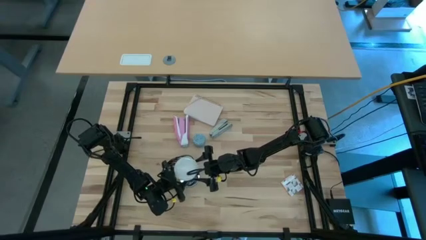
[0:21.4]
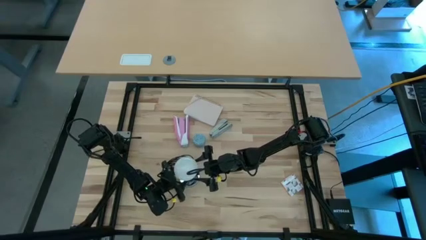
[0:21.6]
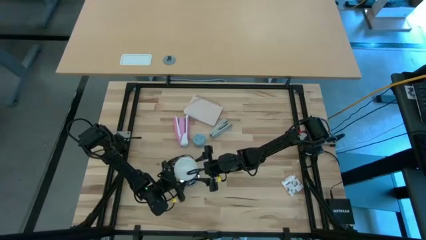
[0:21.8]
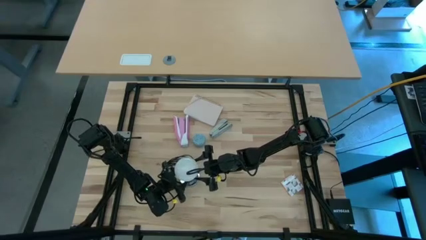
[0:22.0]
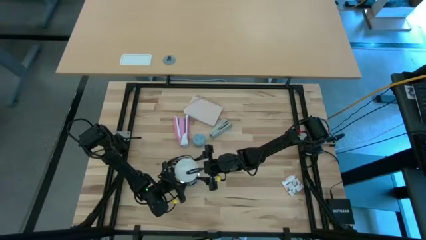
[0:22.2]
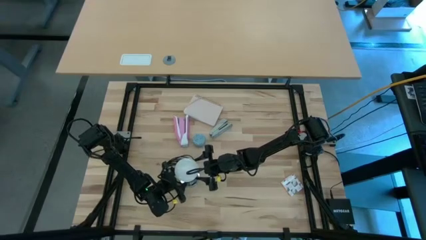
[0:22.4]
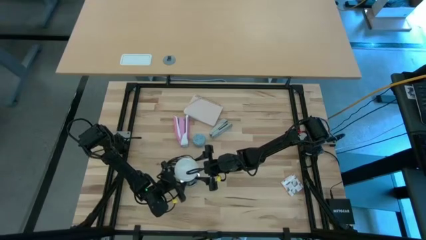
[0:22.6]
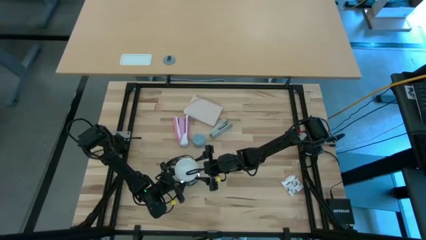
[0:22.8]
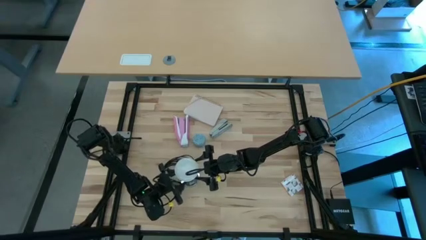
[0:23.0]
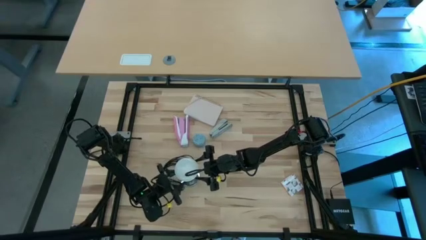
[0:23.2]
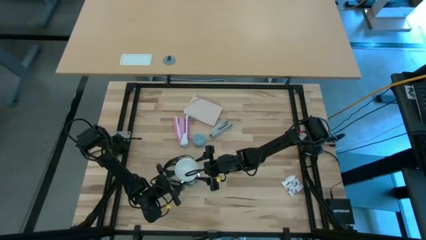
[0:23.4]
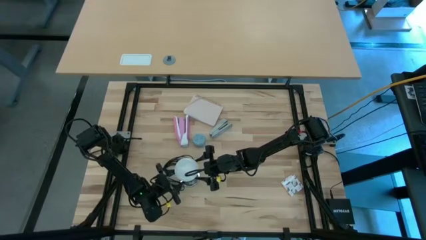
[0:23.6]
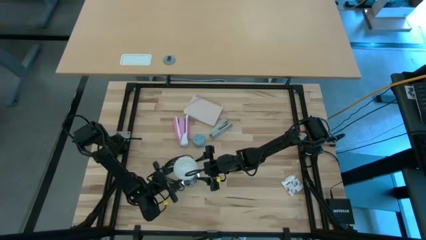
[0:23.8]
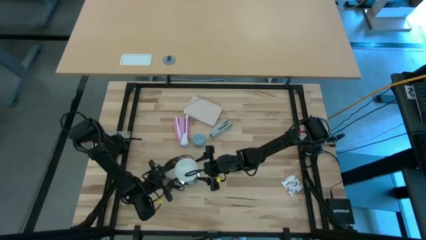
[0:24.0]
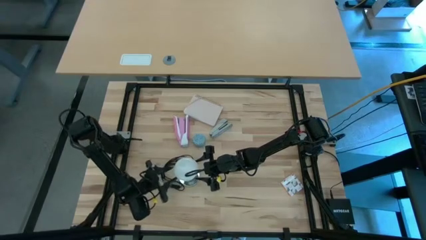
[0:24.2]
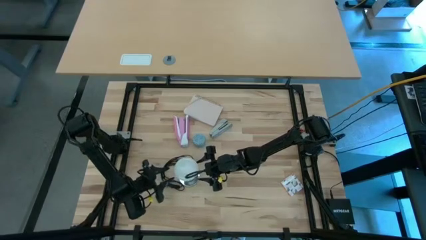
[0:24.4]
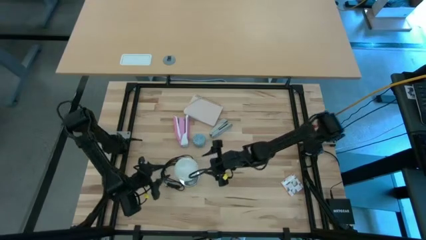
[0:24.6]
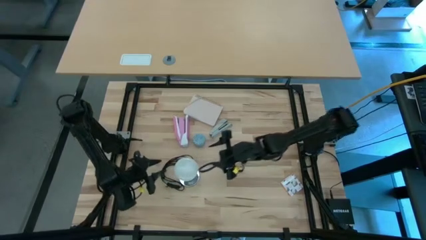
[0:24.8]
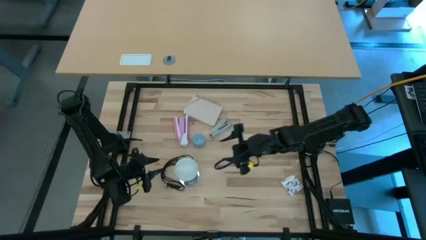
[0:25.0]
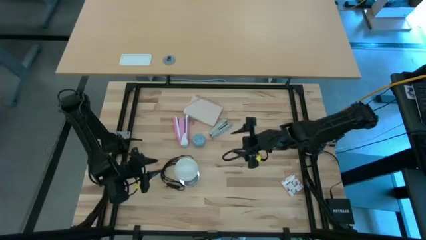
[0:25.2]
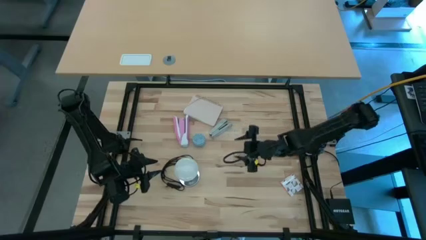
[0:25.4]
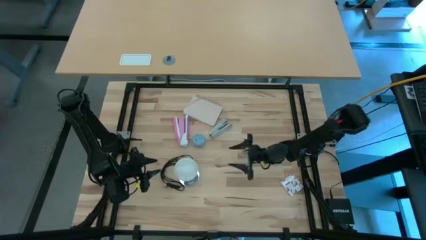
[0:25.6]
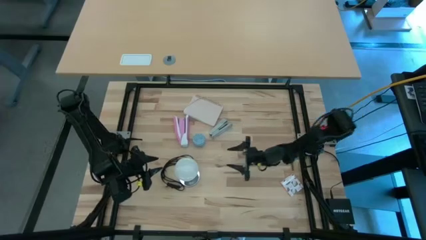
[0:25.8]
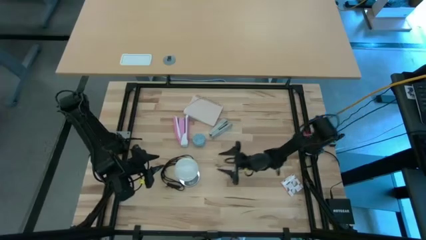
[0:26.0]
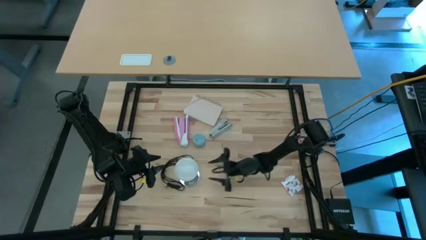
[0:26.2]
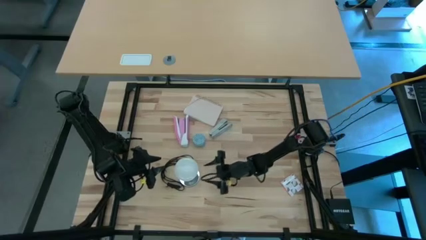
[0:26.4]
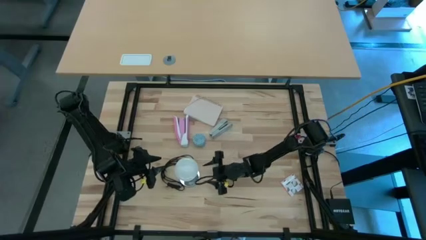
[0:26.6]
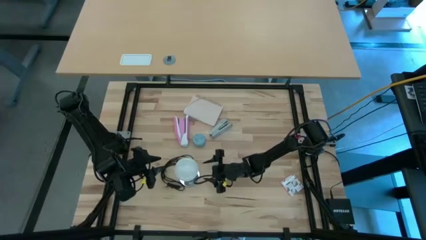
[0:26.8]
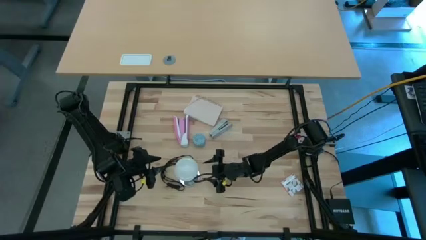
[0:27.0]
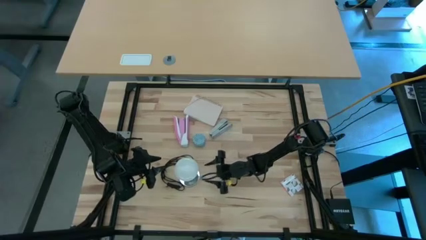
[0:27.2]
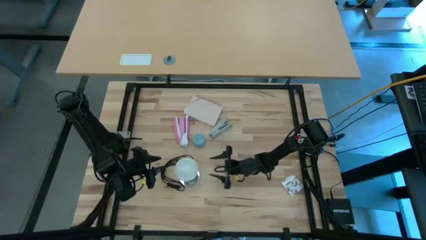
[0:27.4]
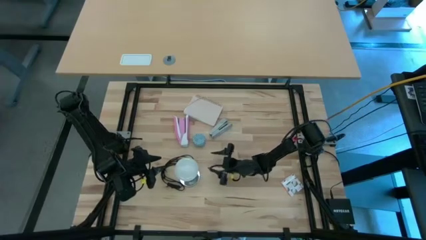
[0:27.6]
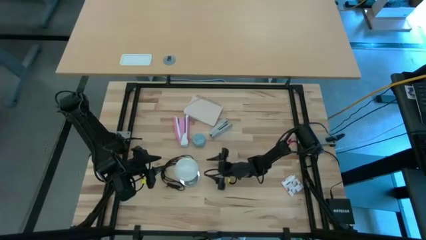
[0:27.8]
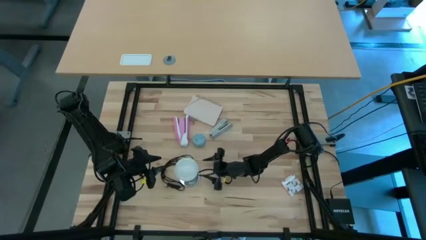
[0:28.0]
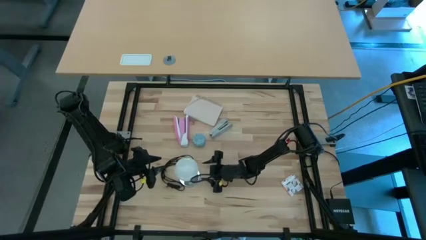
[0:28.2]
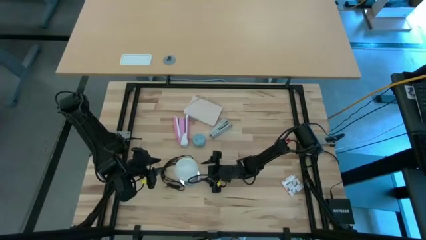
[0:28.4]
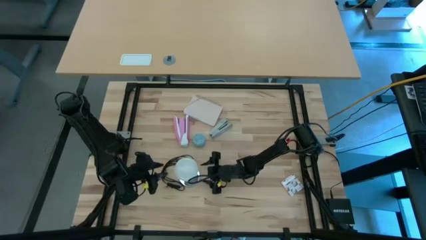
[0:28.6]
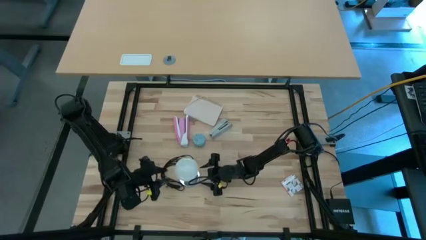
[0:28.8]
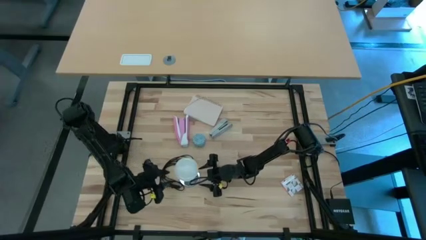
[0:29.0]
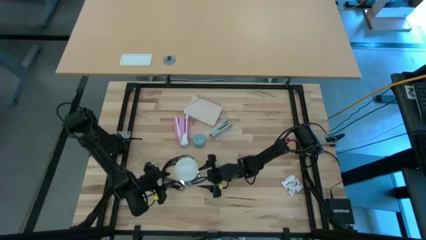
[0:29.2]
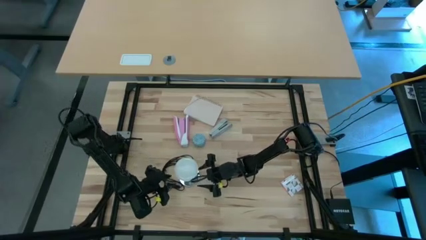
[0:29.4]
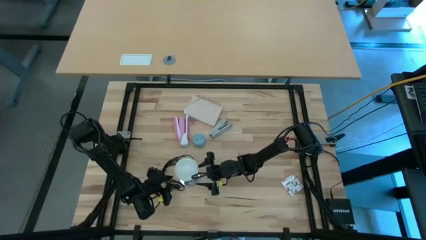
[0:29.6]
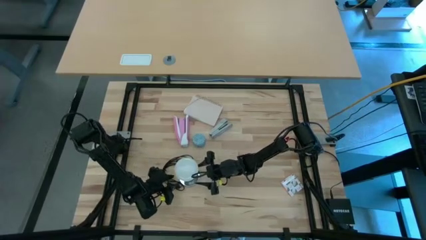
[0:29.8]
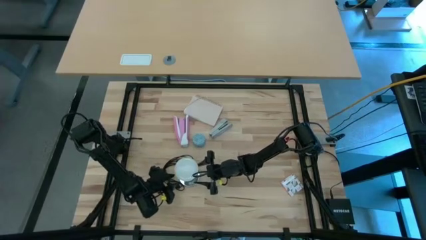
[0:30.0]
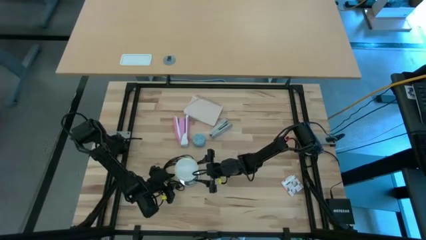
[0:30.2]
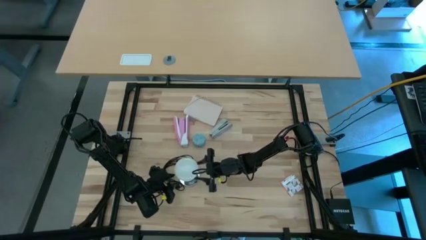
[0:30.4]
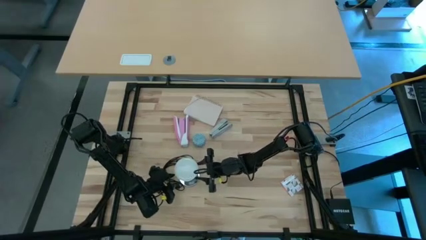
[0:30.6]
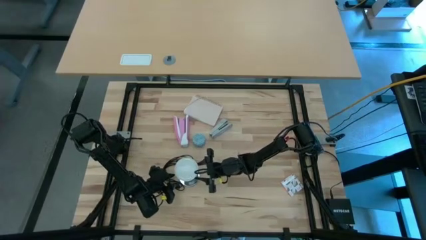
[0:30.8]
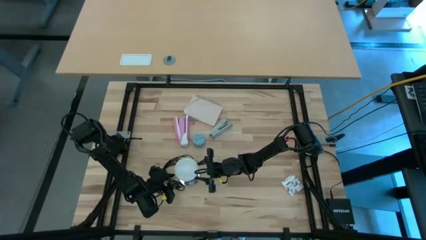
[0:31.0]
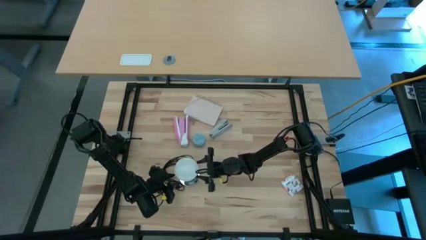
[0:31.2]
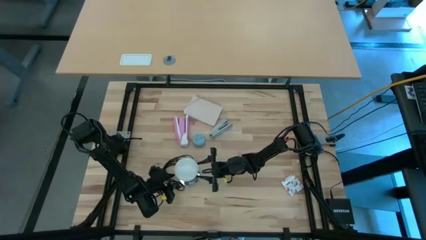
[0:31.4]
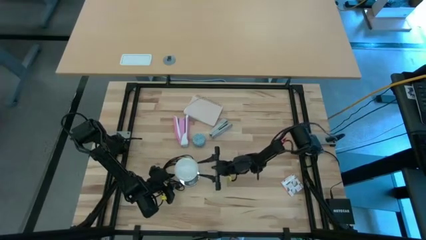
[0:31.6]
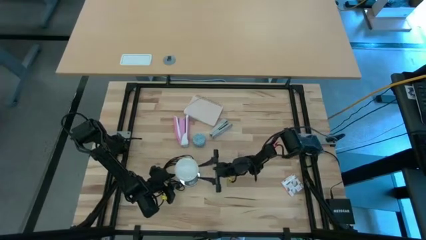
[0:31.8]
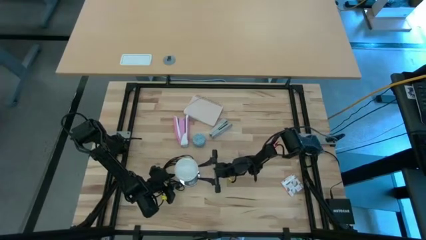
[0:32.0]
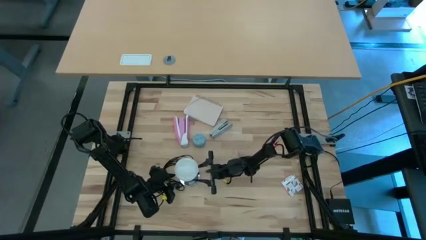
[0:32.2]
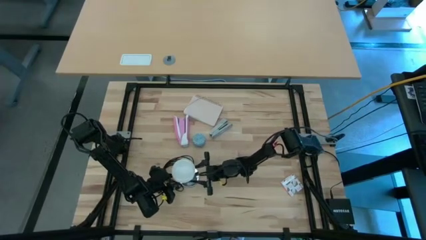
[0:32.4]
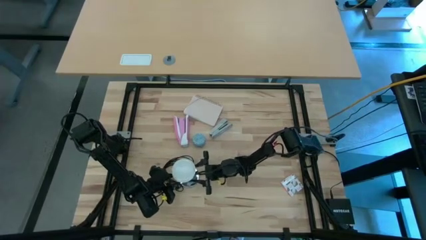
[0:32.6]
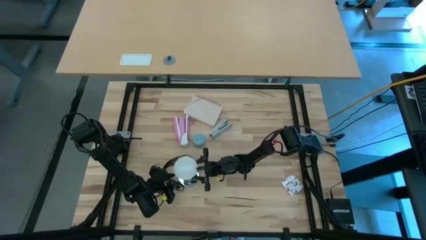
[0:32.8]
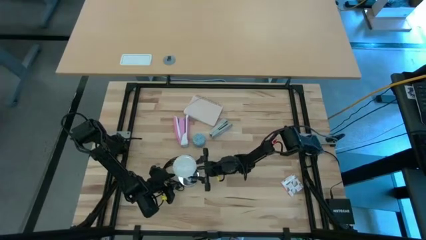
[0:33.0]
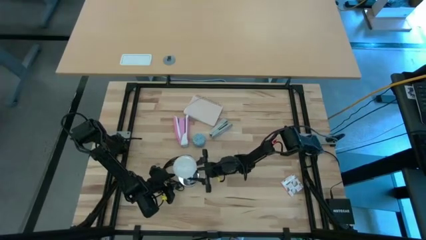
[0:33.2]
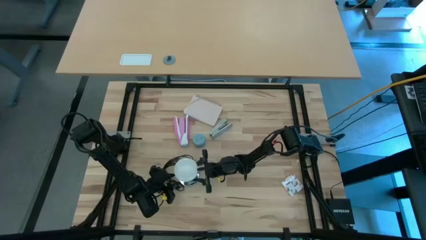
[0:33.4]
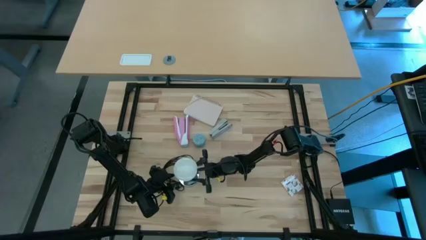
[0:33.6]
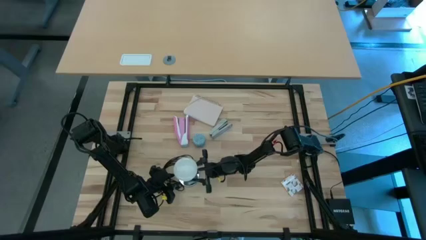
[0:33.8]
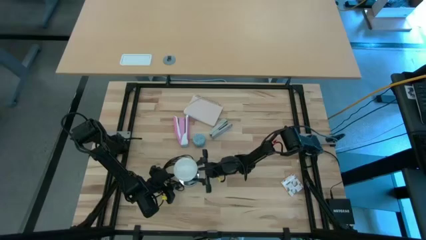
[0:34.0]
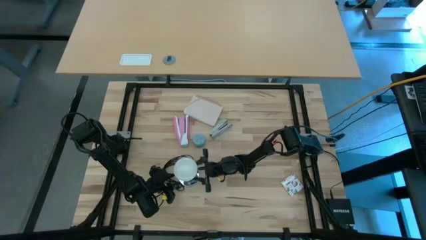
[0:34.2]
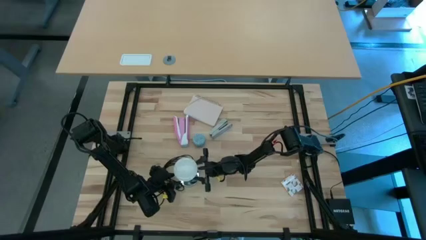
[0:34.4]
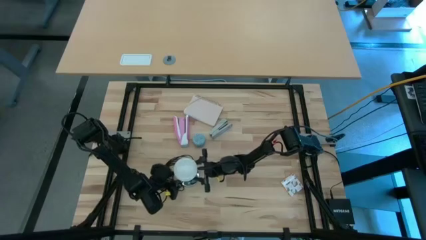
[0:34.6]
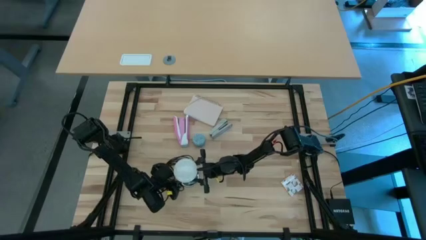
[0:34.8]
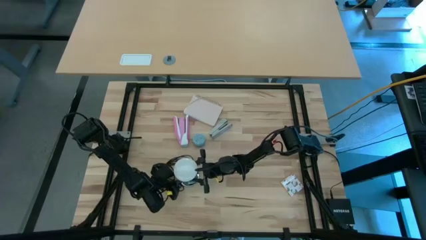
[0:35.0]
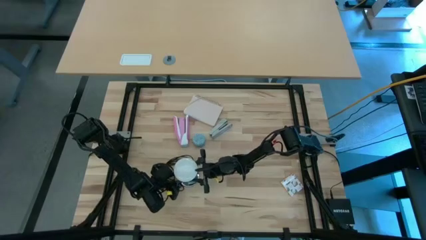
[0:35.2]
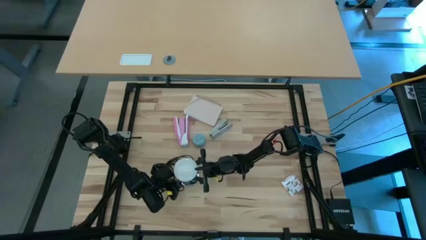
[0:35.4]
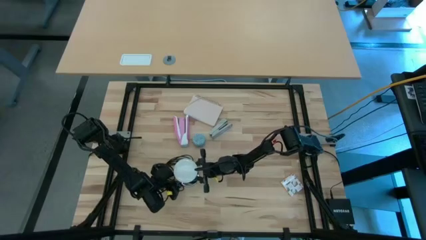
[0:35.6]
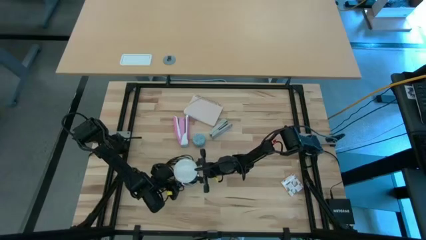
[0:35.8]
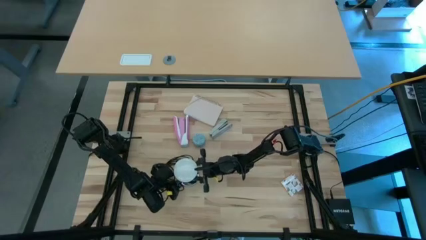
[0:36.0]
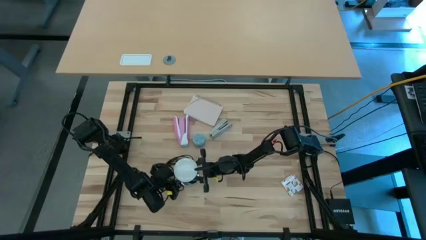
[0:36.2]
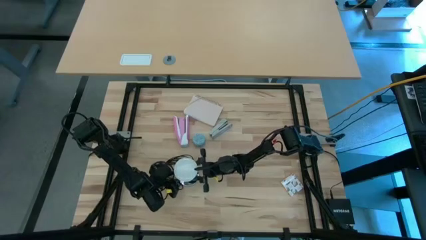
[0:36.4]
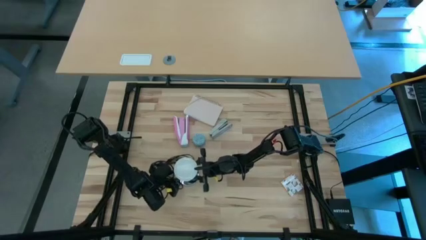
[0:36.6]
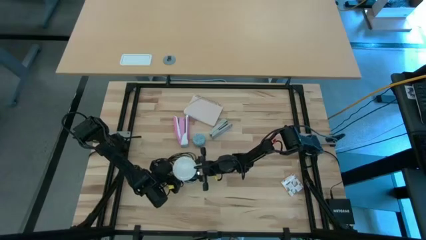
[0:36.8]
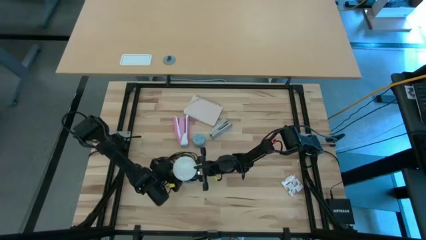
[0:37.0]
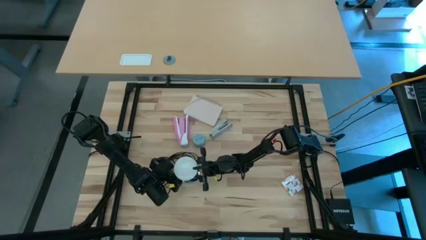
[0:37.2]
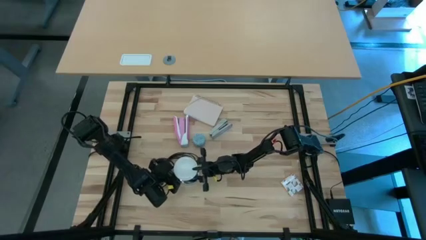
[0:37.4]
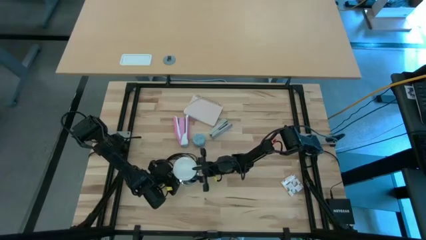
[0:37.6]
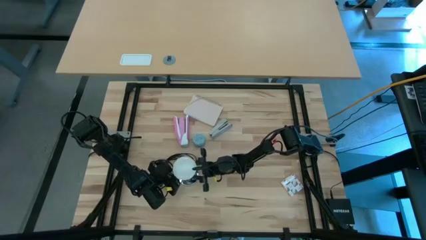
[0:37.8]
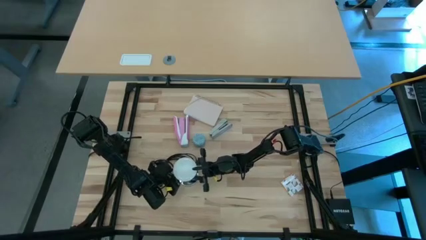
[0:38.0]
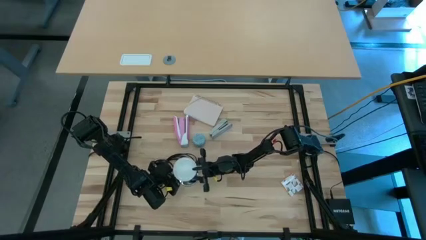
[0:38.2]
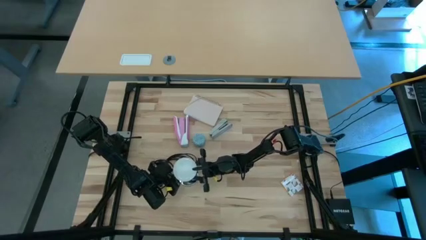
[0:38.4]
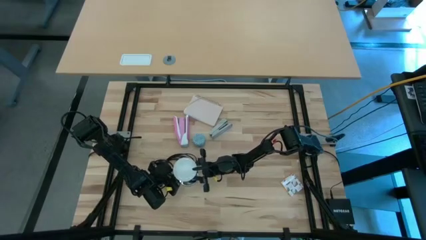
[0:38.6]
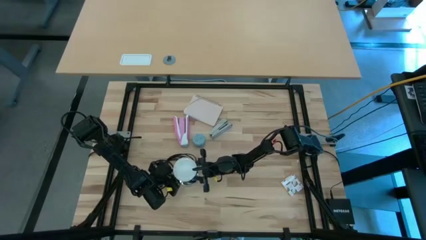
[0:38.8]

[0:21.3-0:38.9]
Task: Screw lightbulb
Insert the lightbulb into the lamp
